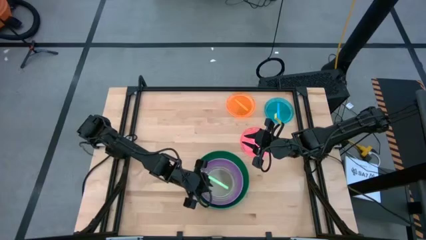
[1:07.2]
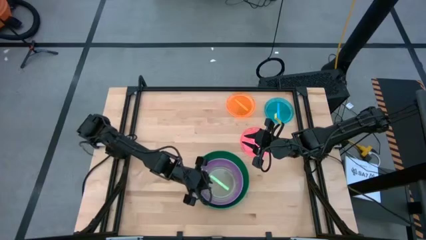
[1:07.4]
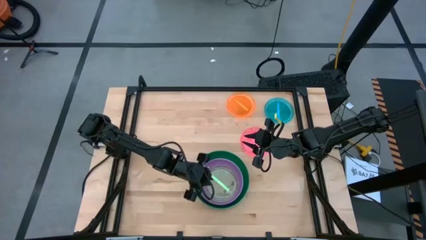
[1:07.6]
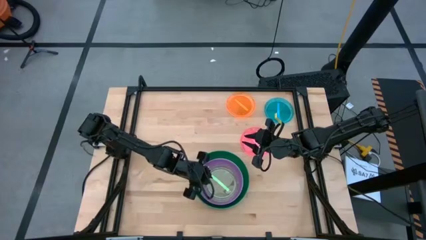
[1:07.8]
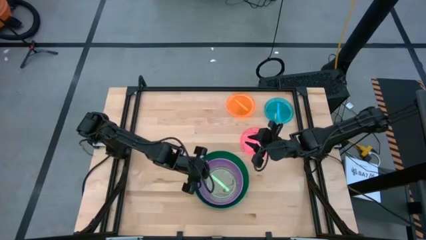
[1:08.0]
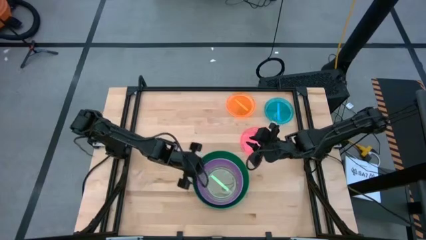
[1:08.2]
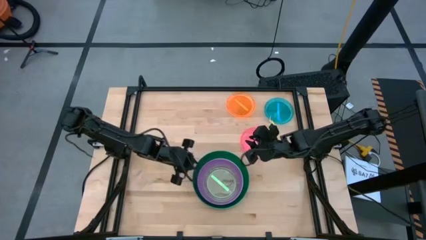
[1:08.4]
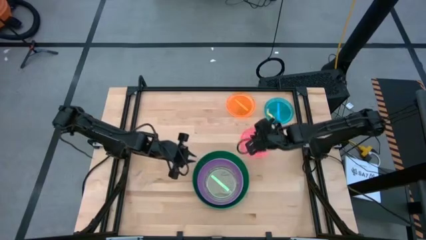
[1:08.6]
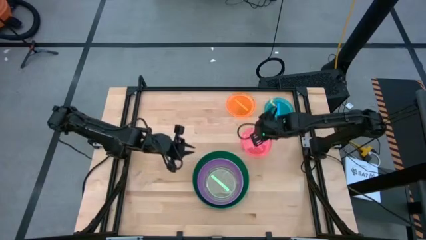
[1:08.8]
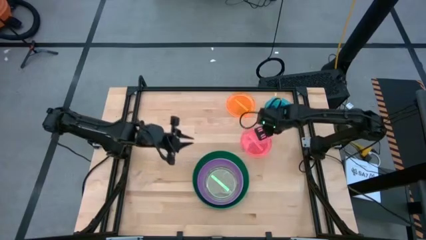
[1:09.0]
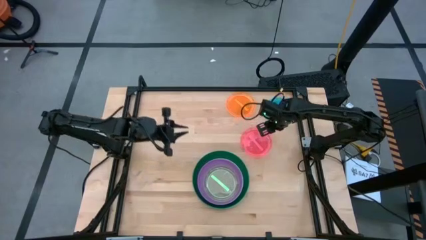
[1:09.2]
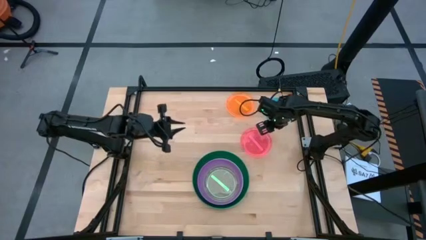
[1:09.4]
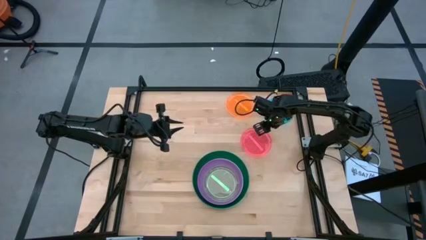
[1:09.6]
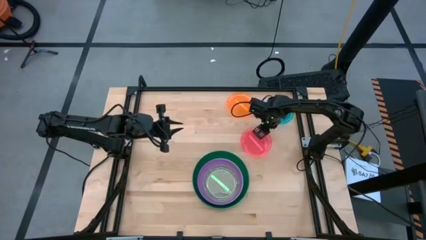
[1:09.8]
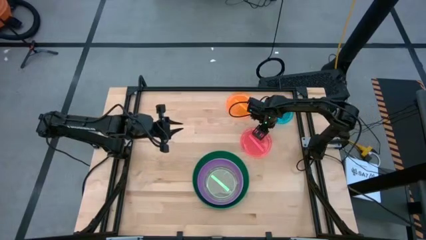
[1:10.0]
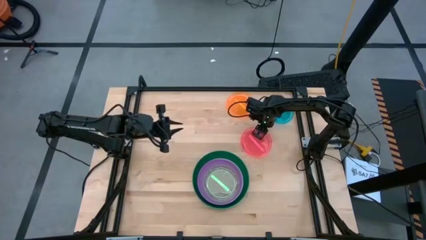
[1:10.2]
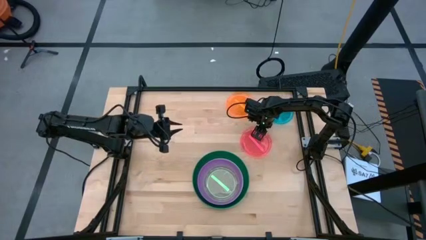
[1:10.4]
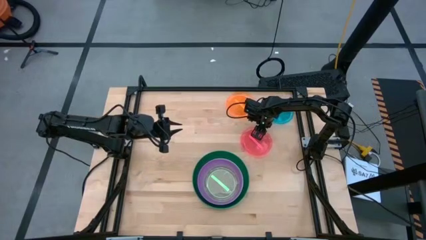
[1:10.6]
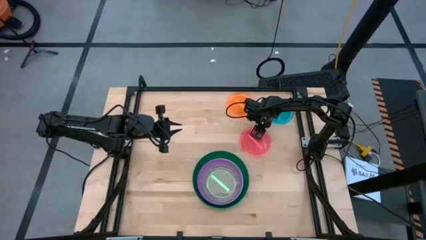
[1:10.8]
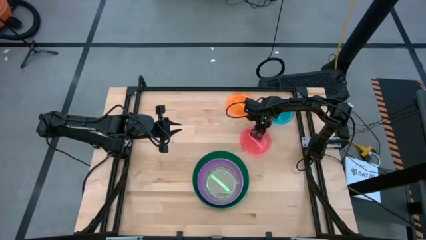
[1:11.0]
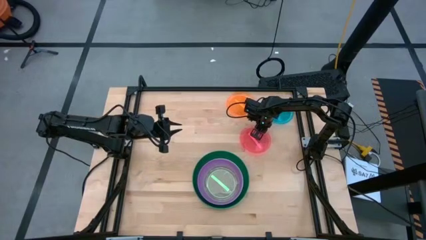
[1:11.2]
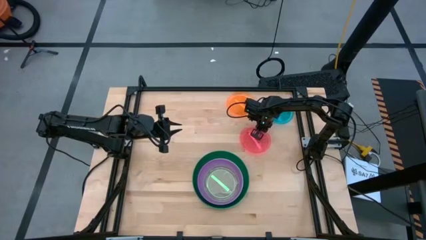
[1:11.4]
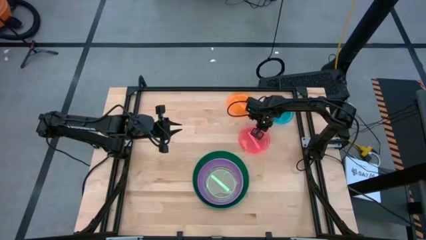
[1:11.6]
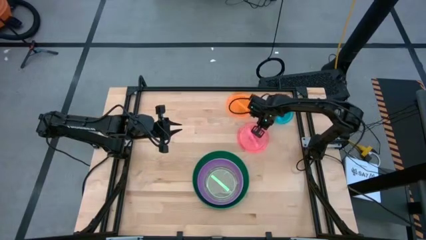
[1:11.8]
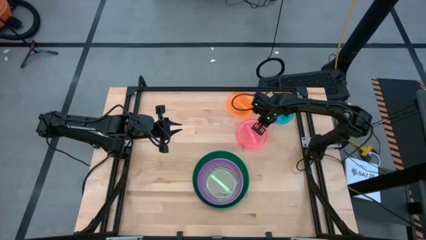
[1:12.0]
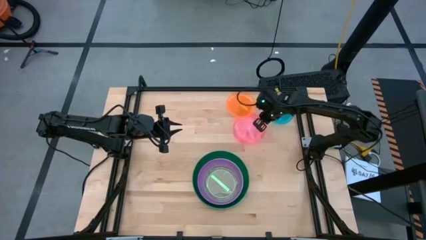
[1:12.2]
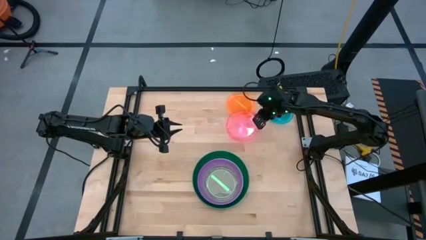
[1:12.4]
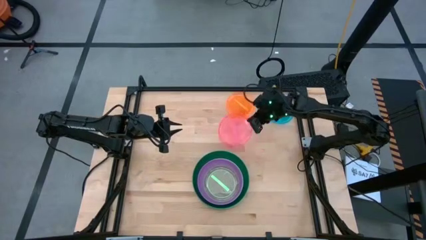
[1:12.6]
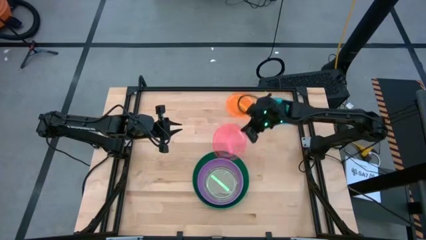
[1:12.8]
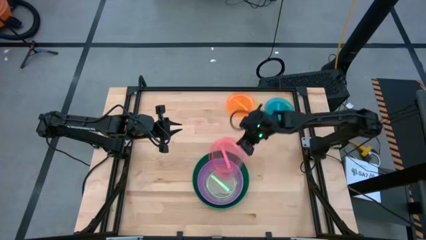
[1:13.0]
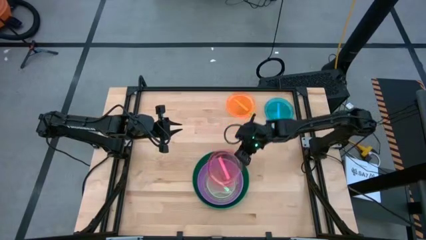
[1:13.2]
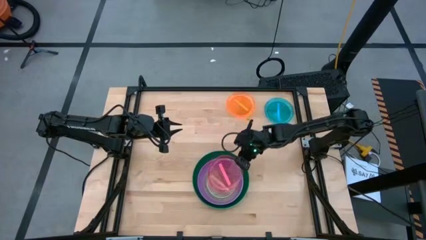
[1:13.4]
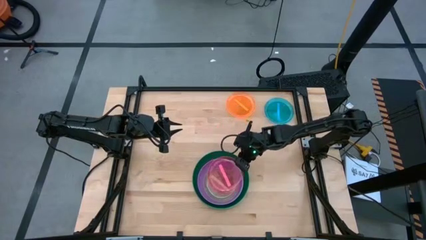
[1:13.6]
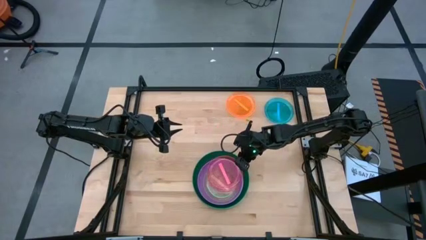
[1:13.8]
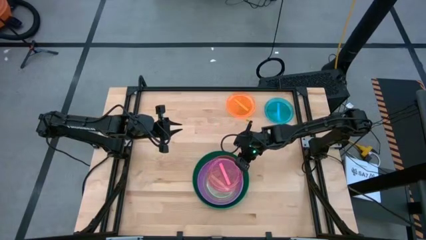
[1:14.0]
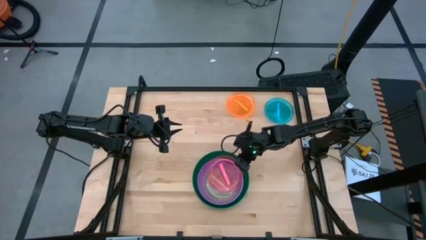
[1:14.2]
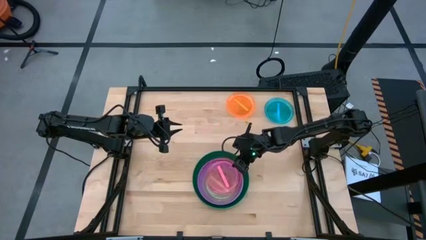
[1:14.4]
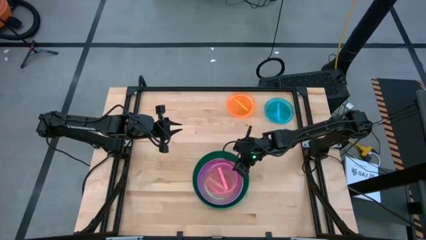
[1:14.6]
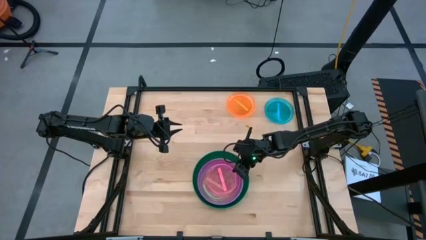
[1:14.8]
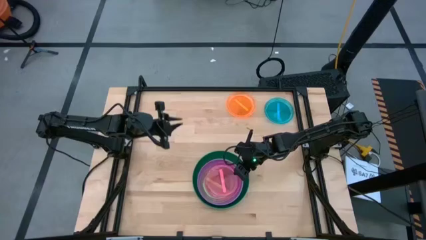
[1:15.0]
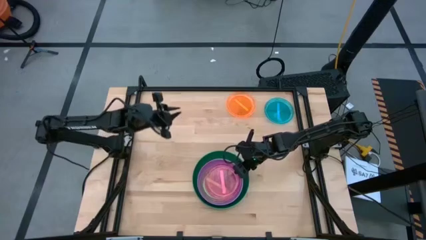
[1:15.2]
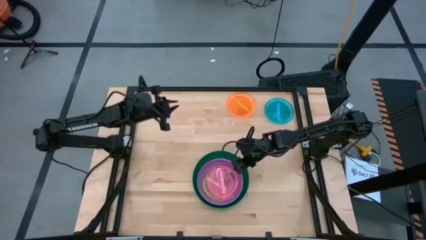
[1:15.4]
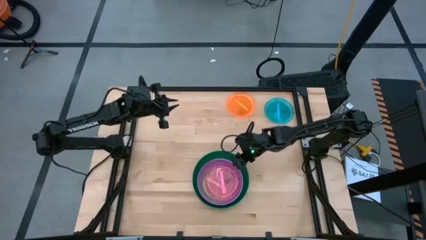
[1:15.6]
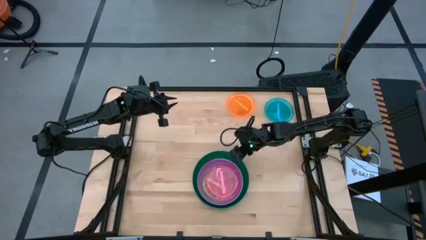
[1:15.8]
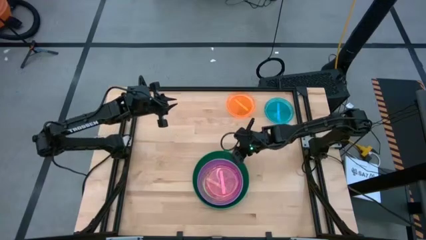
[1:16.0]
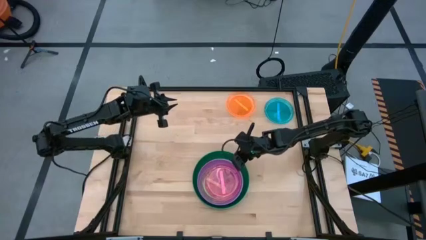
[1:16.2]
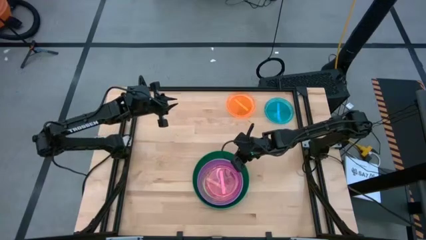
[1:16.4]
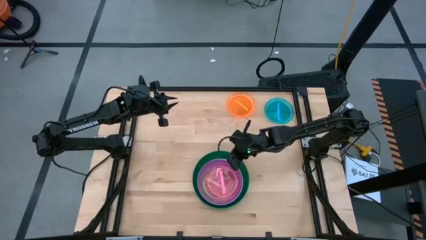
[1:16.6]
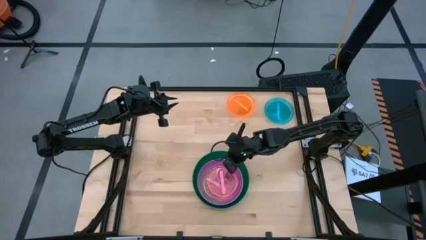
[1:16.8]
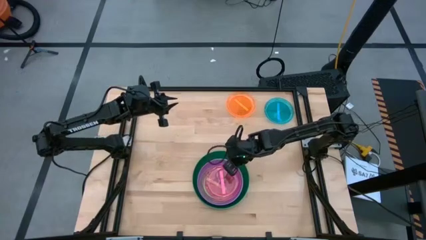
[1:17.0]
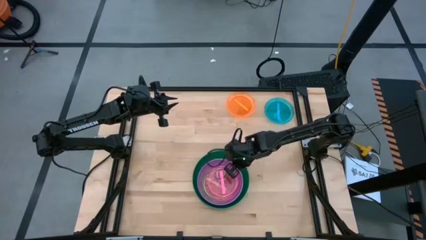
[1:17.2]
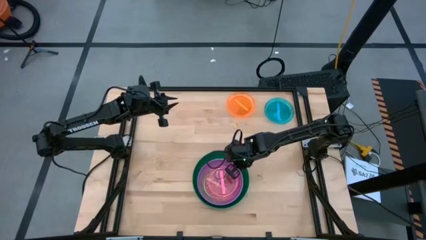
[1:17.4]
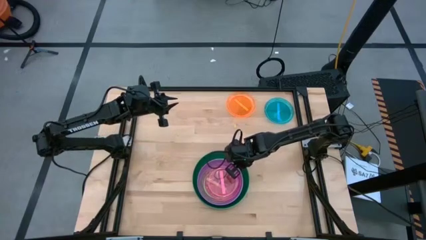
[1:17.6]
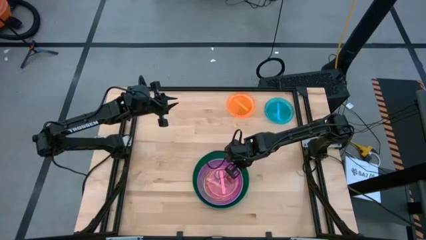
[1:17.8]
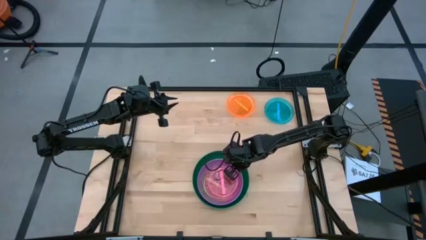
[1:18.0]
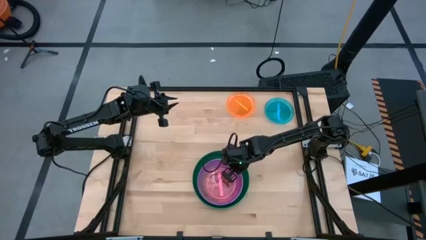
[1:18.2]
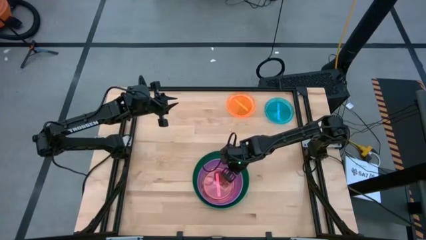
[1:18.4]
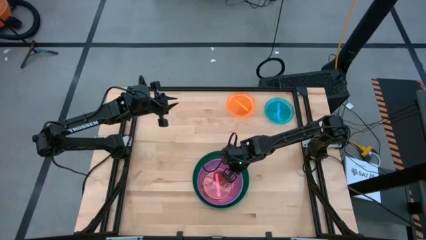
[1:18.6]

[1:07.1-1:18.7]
Task: Stack plastic plates
Stack the transparent pink plate on top of the transparent green plate

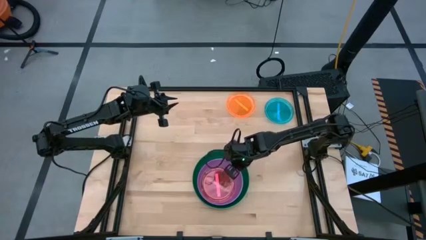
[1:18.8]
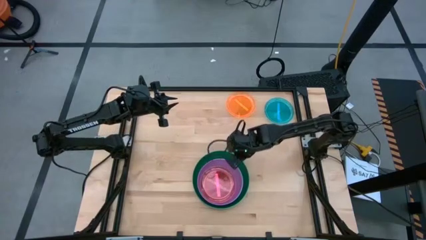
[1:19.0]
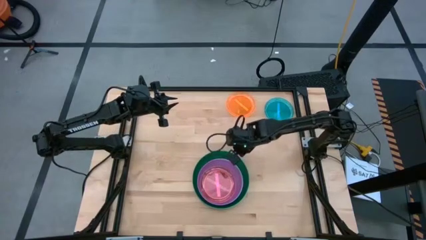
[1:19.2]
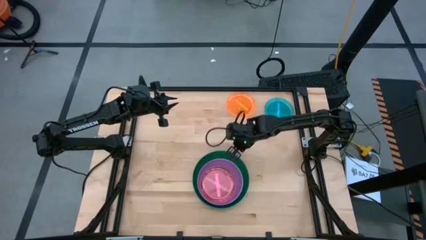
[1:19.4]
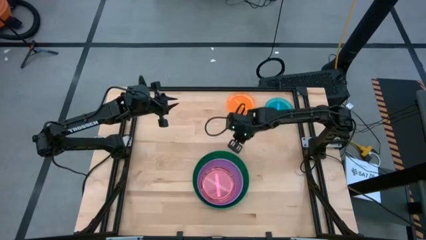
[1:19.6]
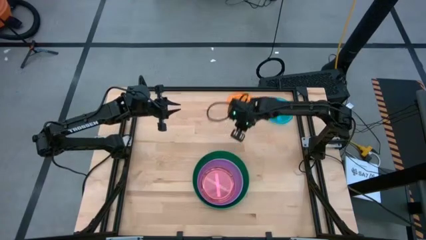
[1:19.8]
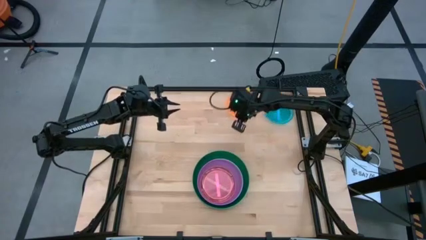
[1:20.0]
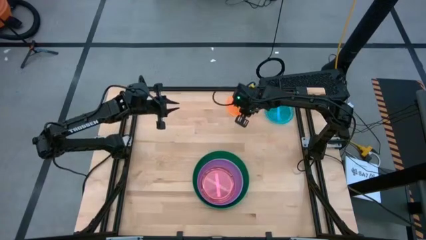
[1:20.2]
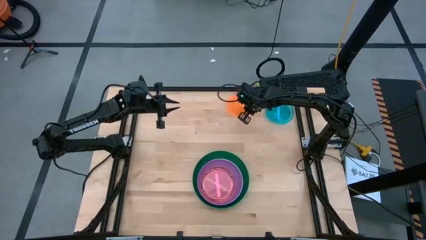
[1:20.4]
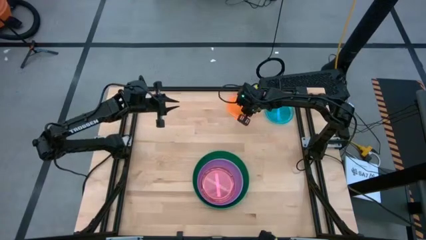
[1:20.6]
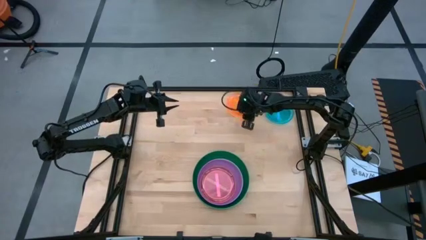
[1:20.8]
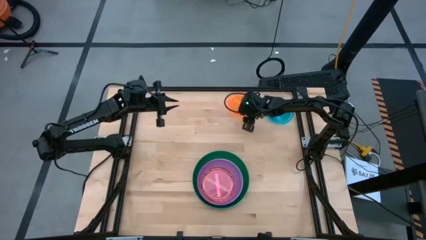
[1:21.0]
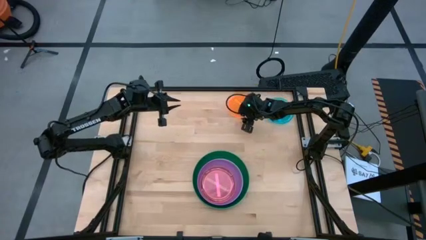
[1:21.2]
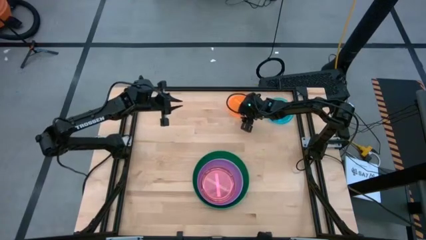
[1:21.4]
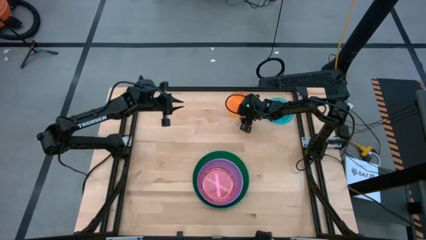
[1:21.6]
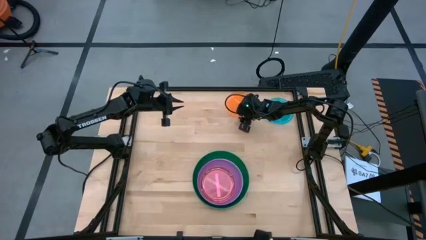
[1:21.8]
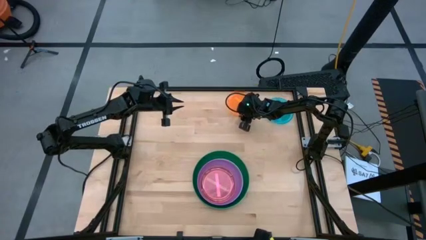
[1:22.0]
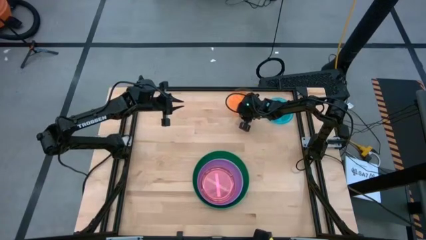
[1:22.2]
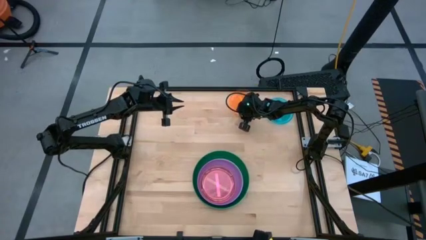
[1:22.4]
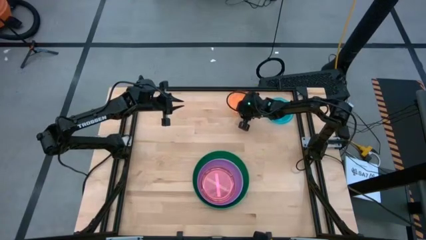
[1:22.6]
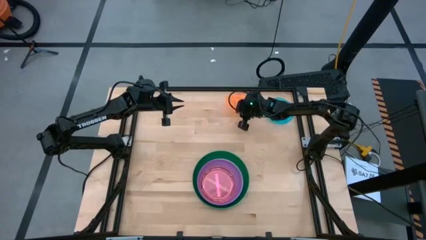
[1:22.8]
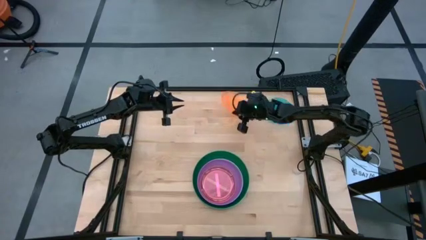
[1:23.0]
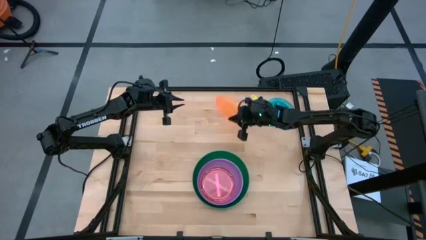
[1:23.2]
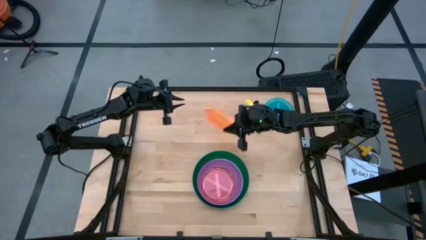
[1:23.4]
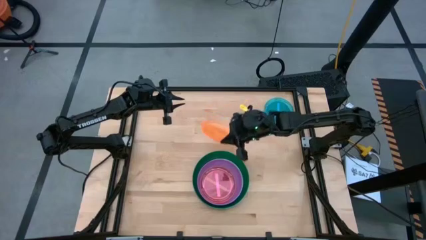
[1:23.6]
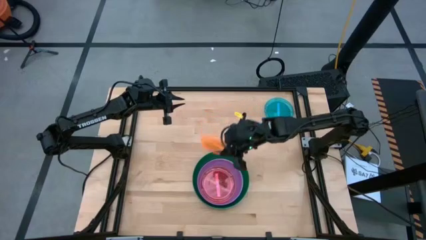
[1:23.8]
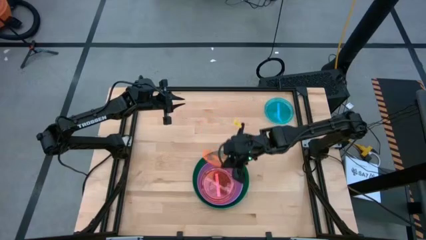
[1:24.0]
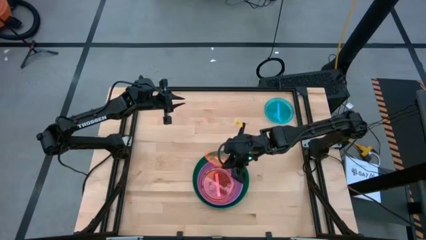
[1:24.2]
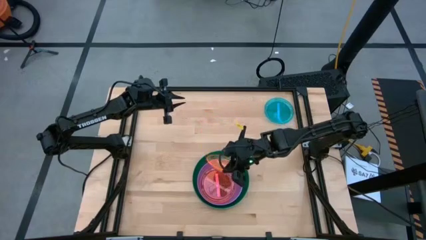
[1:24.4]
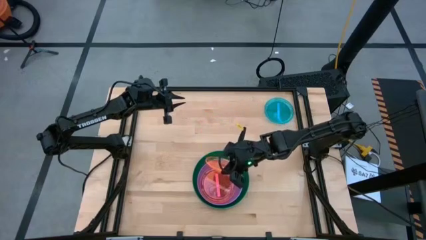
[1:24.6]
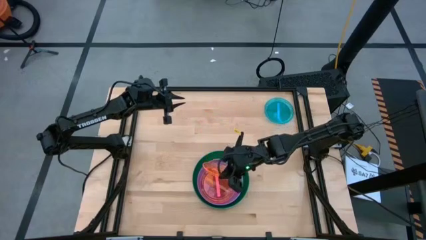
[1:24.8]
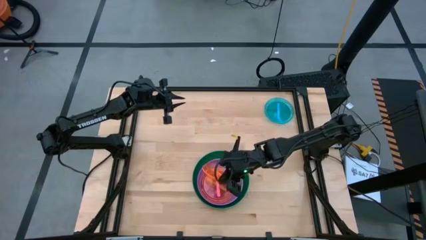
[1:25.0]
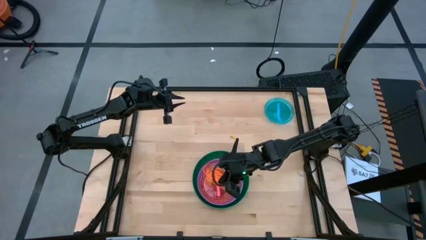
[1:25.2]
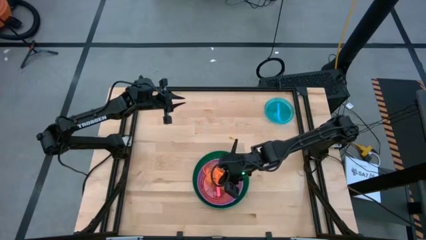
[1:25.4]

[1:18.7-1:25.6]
Stack the transparent orange plate on top of the transparent pink plate
